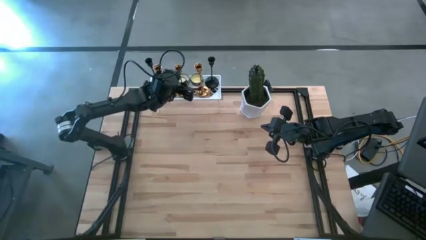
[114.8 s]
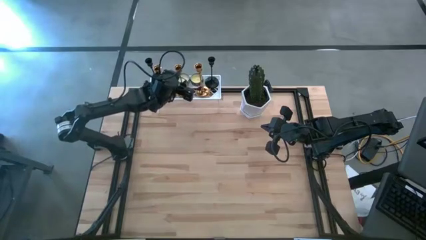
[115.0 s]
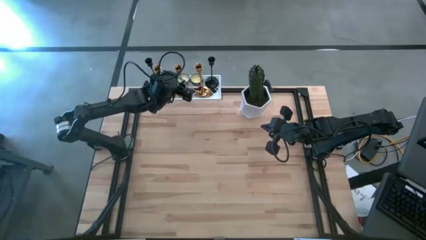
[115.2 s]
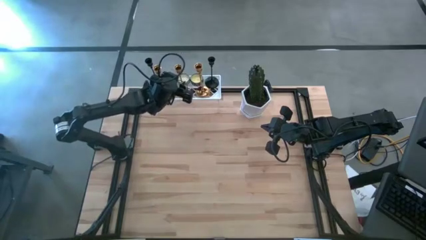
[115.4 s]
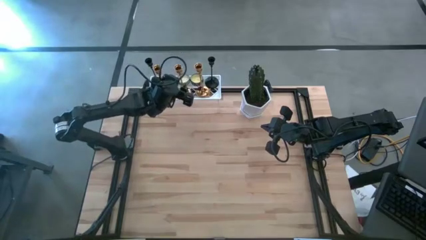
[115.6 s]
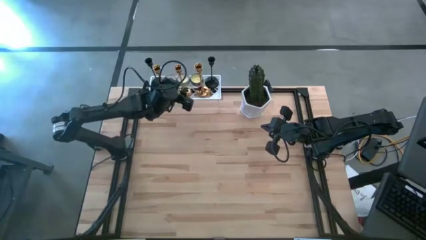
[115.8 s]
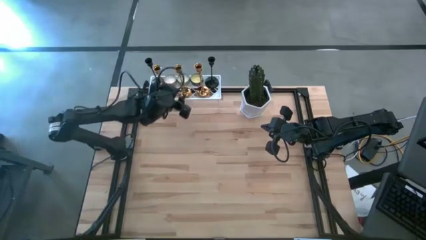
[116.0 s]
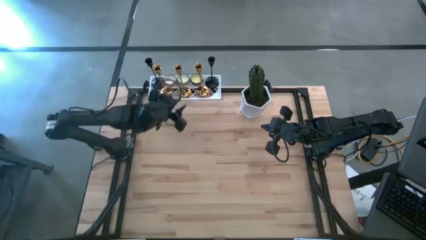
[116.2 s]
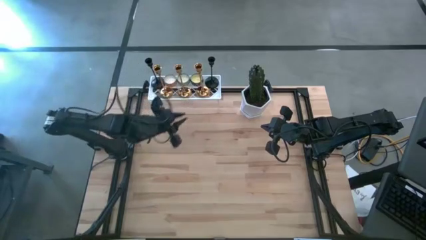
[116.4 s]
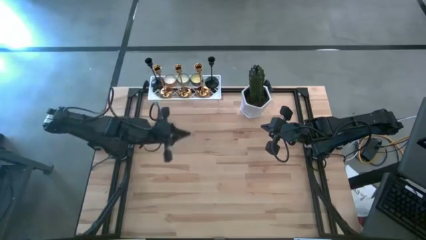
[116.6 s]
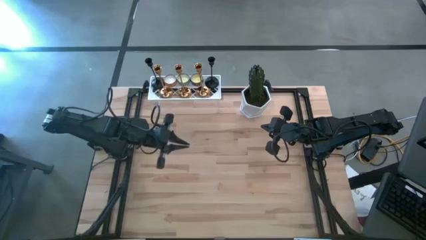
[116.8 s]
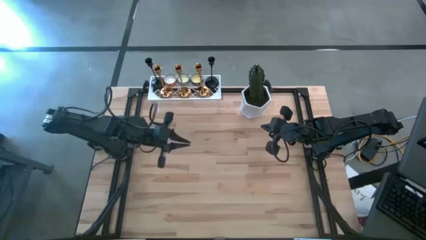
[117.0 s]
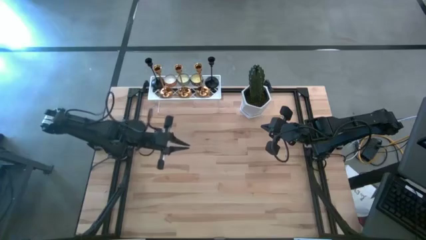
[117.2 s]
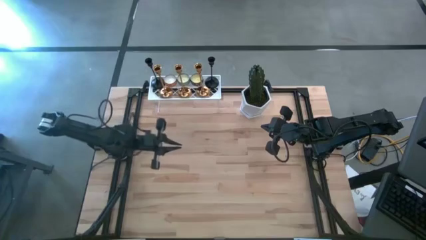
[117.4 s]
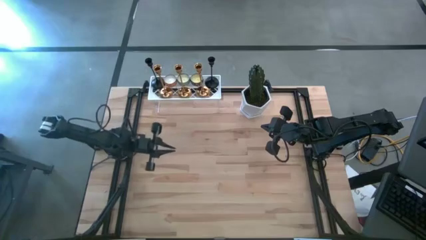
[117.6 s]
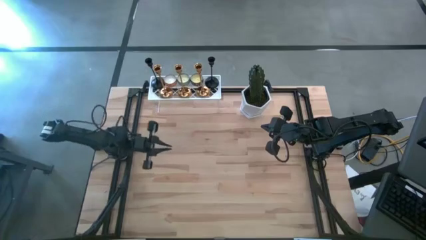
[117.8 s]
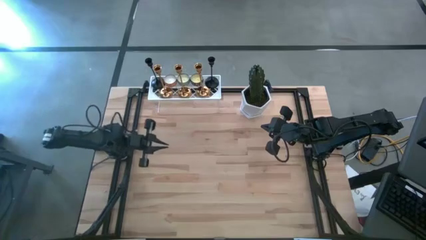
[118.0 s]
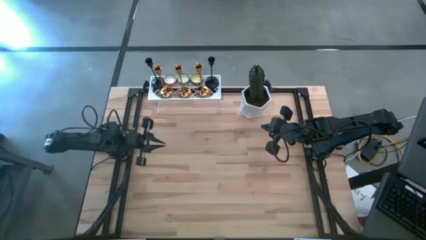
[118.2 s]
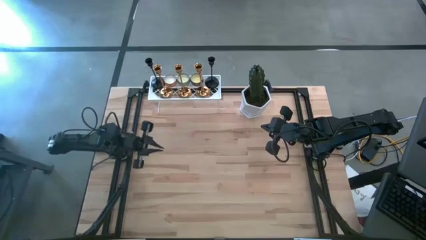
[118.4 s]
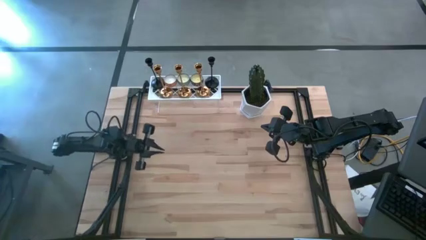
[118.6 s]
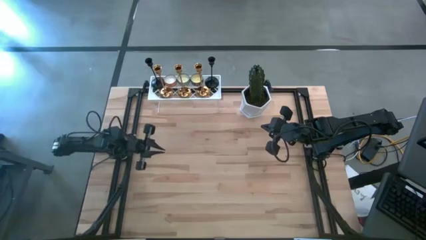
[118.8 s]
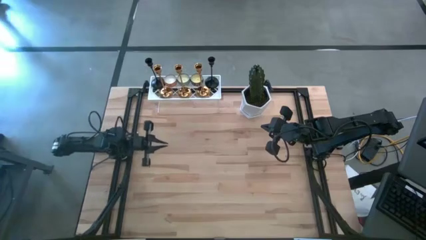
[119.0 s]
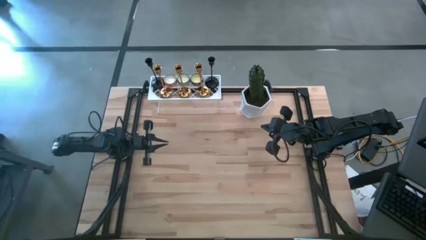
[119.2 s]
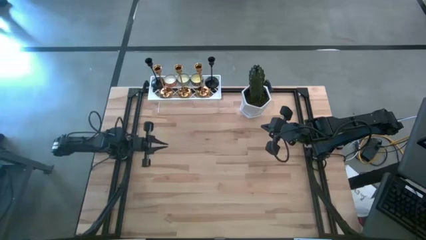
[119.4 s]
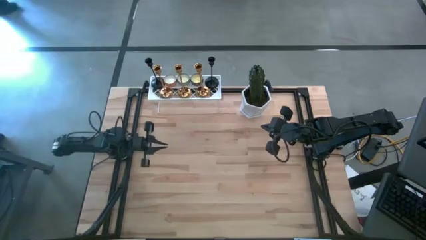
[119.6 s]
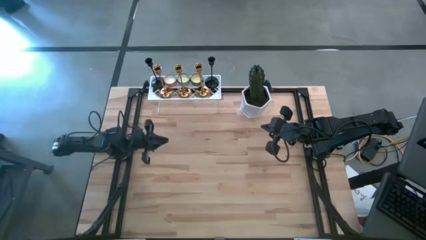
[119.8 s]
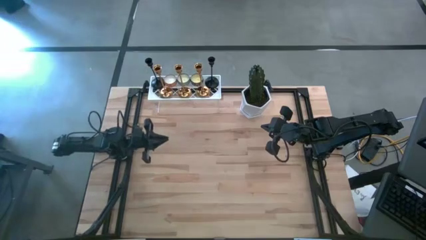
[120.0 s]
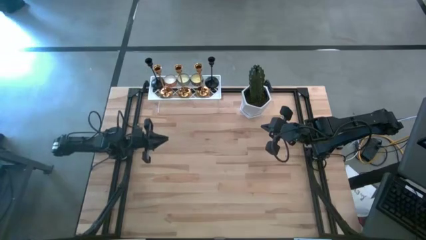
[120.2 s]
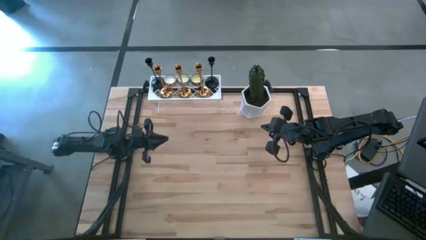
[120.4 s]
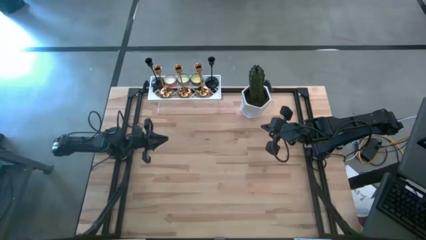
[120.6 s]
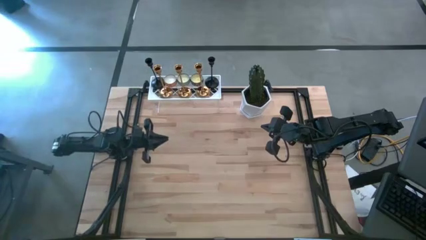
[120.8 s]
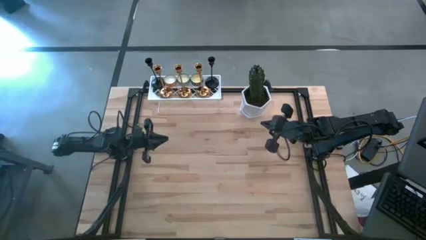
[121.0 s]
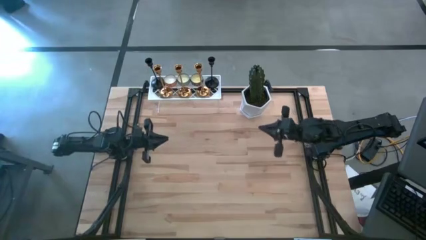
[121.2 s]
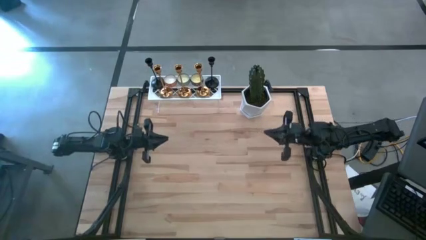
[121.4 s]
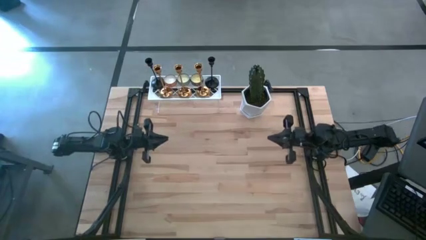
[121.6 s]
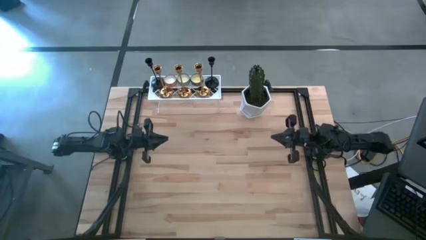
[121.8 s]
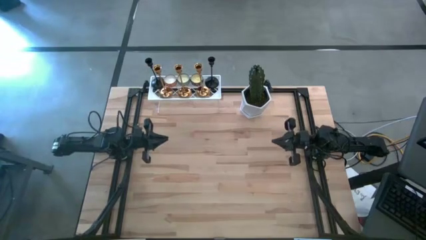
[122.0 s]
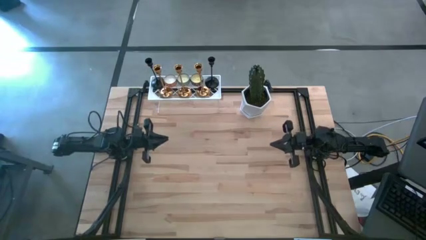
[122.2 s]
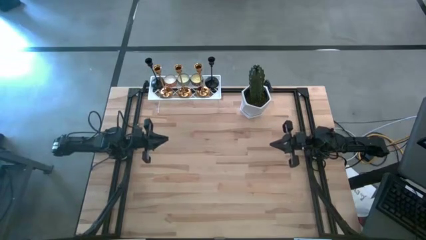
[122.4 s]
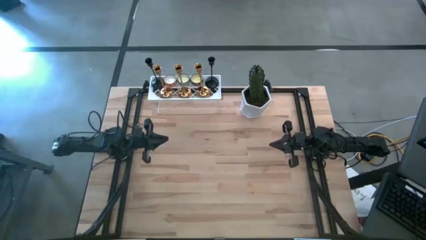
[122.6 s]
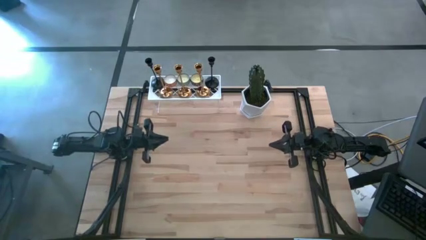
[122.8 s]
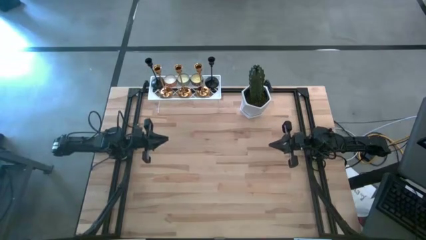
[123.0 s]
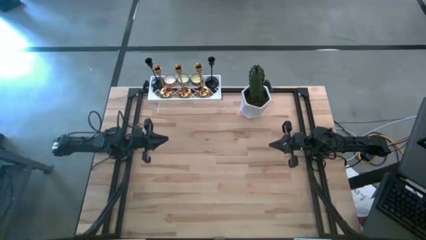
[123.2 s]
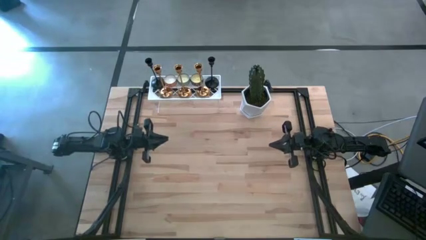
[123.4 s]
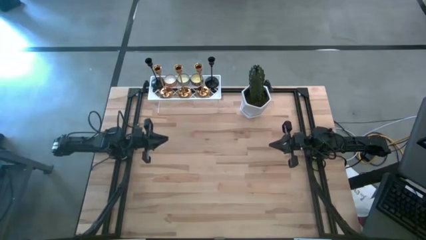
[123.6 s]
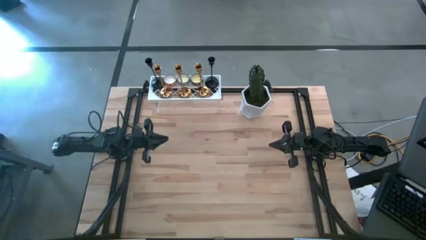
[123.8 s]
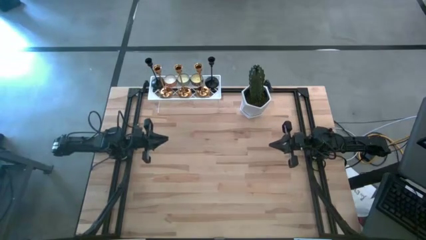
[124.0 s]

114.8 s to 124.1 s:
Task: Pick & Place candle stick holders
Return to Home Position

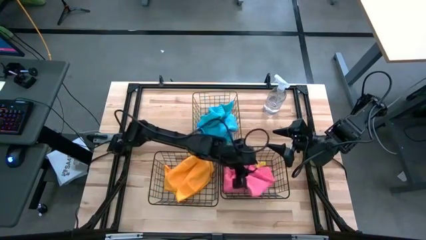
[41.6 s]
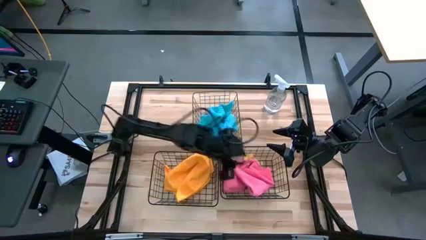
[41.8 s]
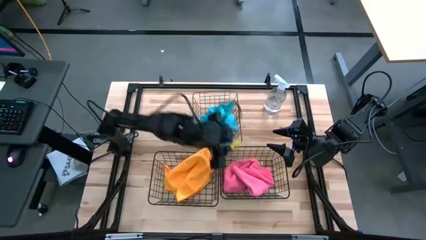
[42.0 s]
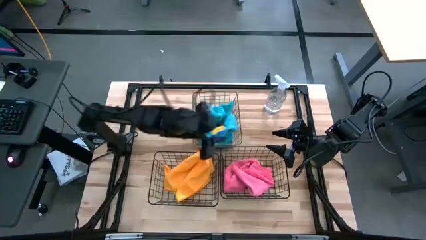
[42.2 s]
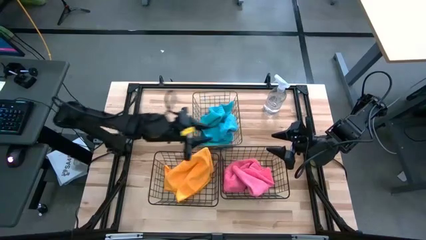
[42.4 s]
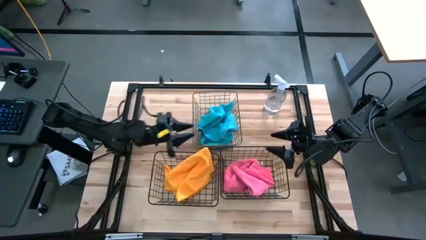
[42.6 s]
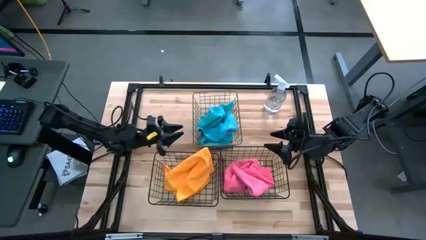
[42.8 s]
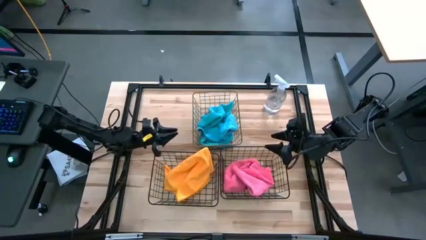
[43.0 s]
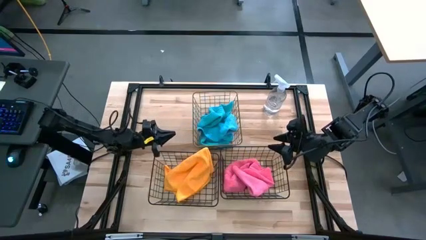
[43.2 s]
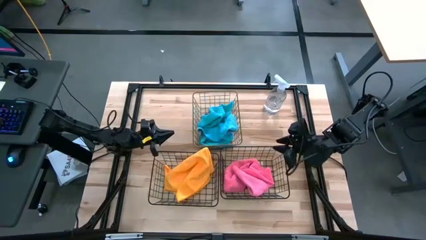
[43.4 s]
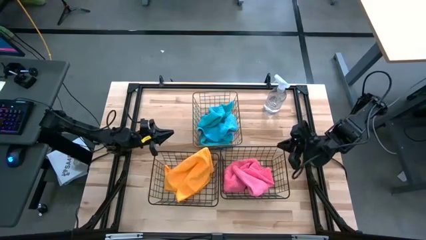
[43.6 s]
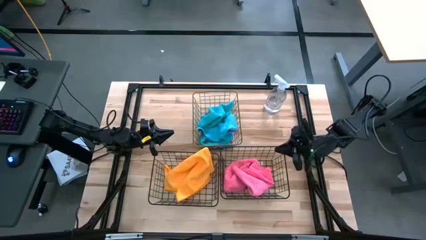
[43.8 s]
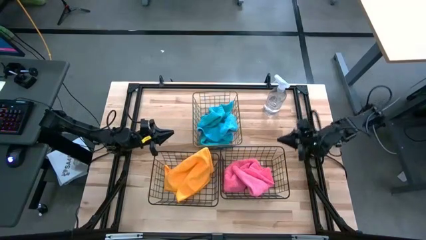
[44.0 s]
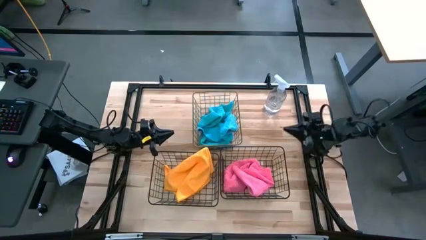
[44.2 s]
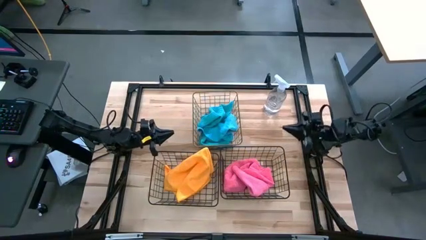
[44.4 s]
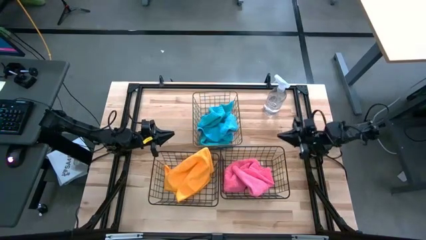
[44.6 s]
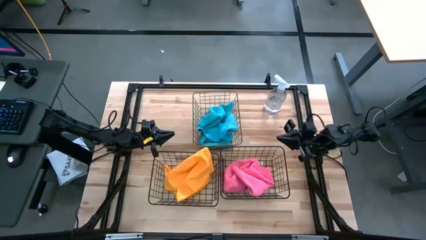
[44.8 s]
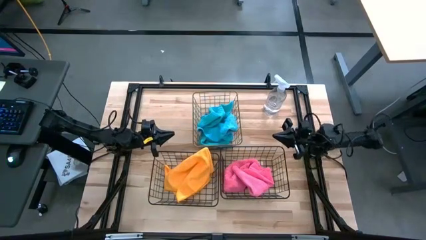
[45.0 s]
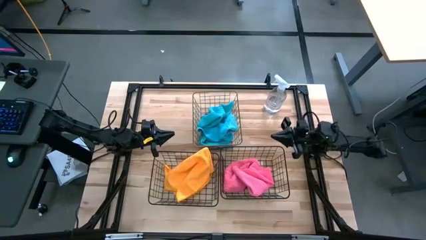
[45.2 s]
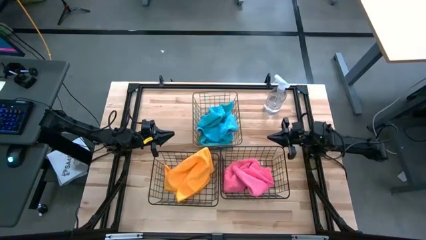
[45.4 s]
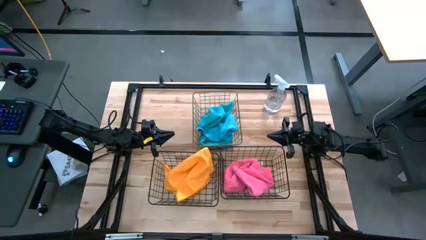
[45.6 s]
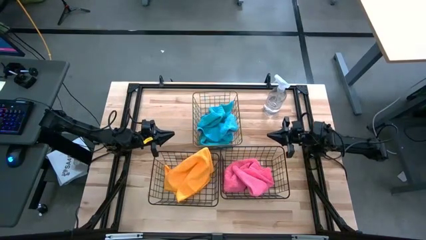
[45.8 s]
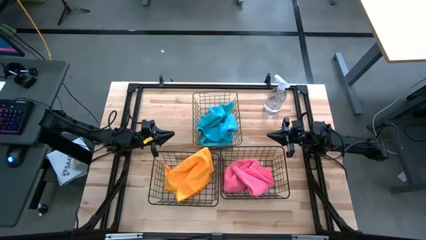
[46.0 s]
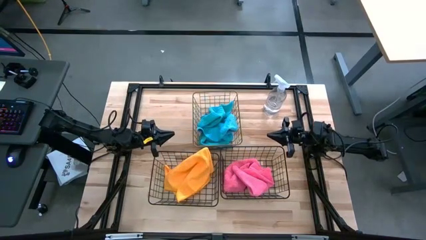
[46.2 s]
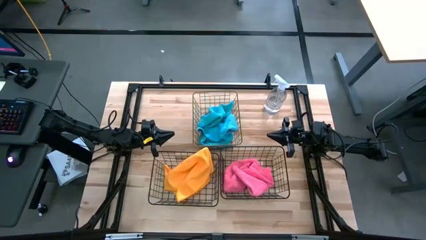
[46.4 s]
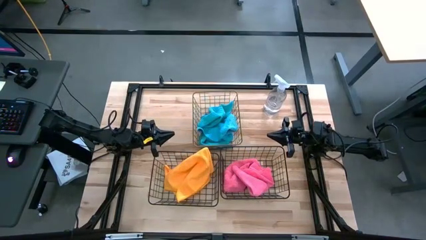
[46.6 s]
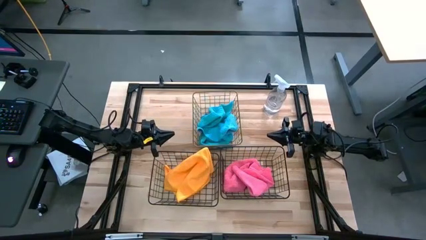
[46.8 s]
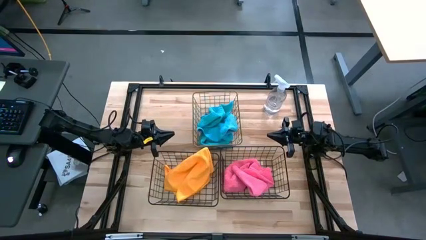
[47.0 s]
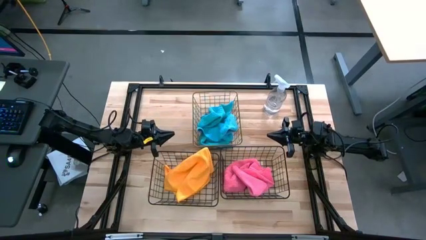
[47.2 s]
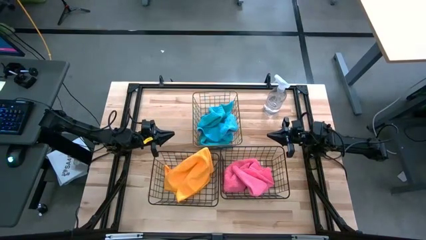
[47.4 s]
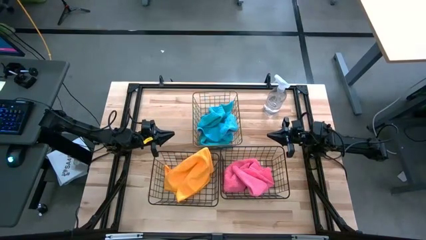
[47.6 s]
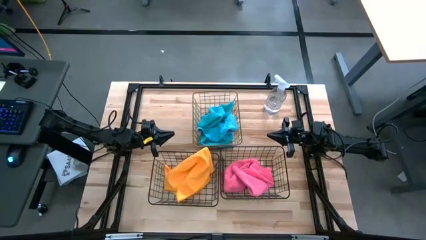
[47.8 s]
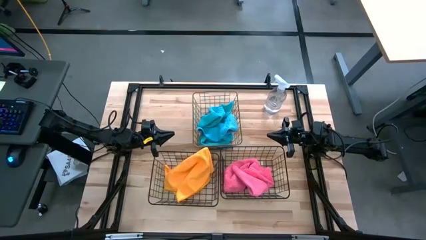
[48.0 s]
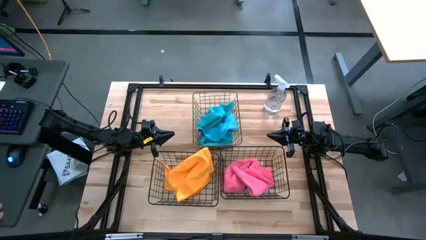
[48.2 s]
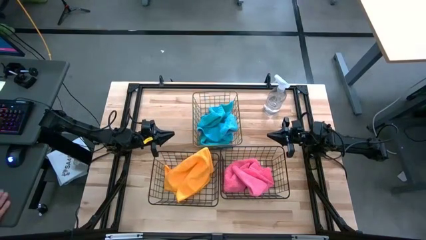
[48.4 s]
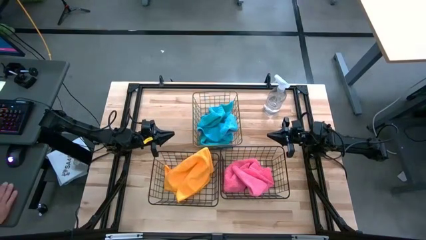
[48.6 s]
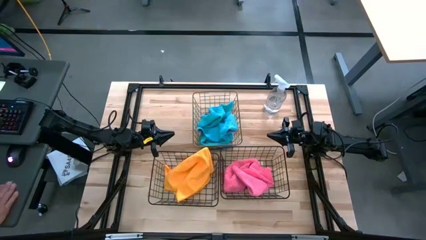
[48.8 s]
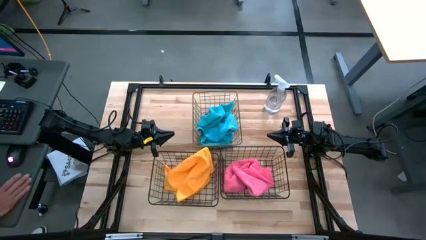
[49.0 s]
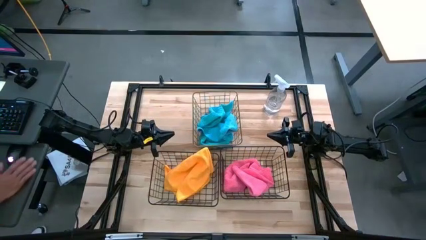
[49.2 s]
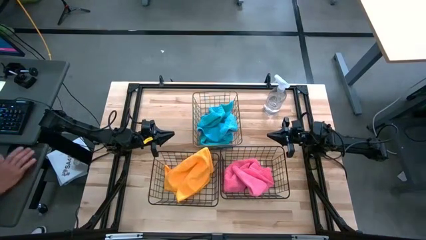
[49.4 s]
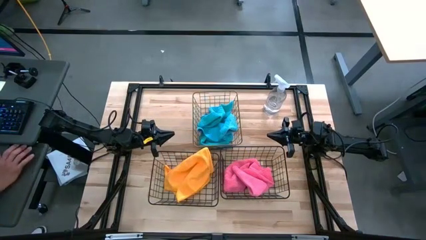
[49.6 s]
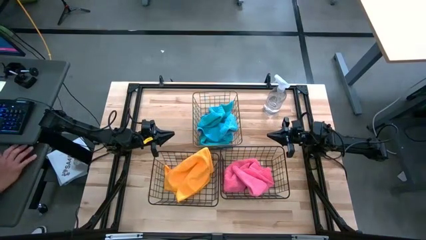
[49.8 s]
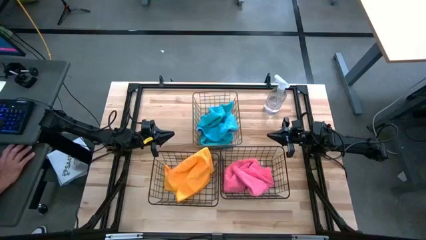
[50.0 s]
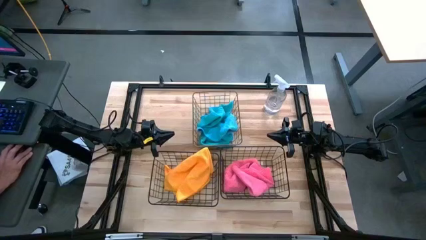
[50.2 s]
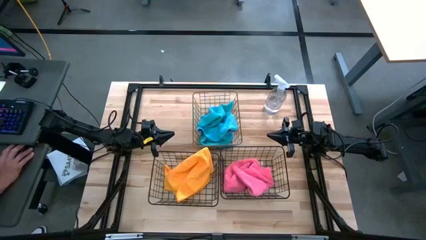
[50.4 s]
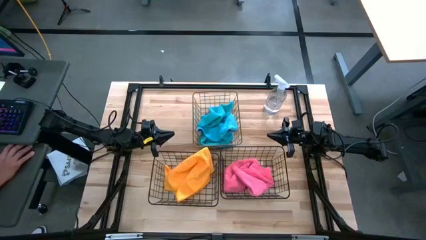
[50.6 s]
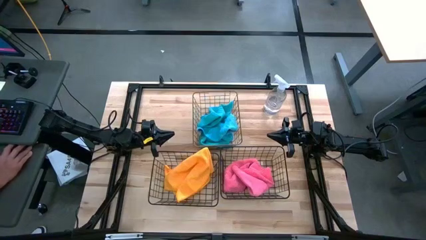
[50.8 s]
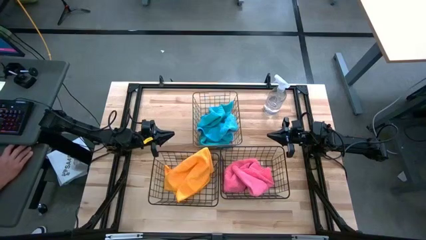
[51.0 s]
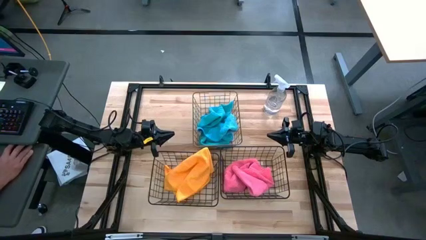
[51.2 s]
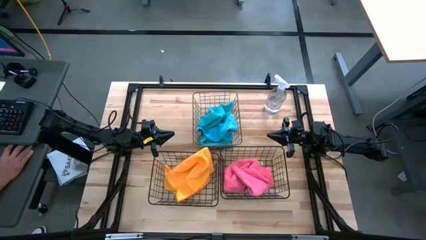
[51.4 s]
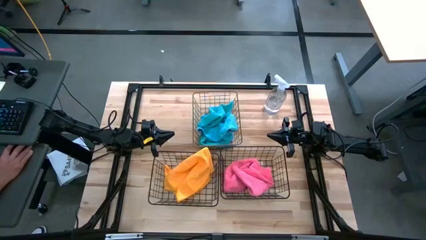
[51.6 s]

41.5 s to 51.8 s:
Task: Sort microfiber towel by color & place in baskets
Return to Home Position
